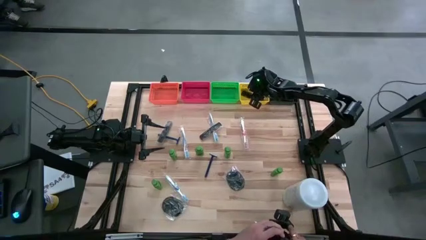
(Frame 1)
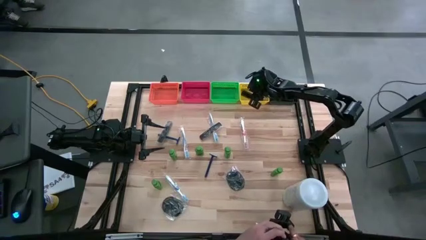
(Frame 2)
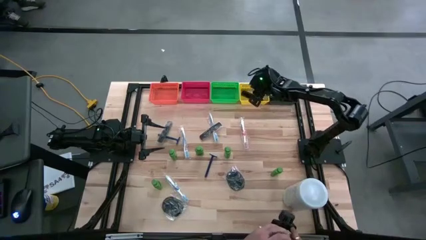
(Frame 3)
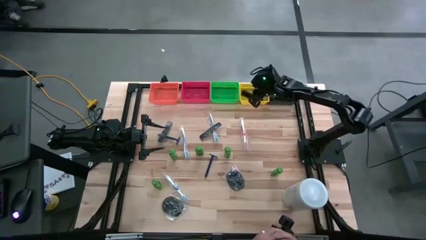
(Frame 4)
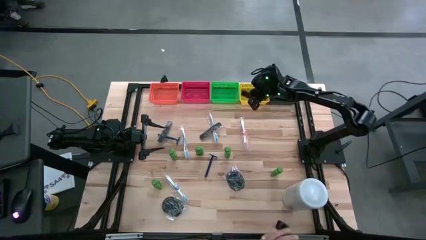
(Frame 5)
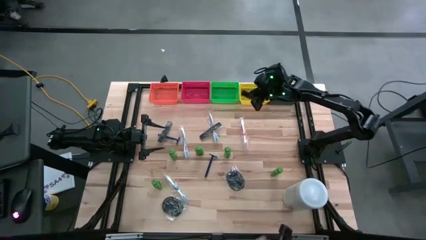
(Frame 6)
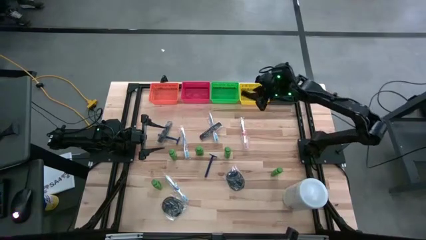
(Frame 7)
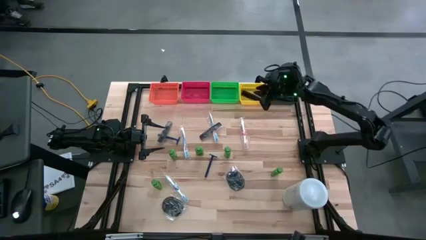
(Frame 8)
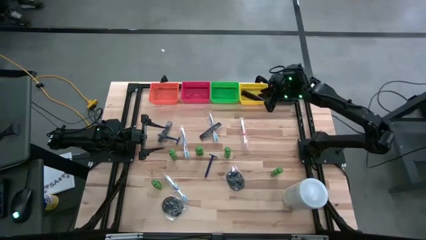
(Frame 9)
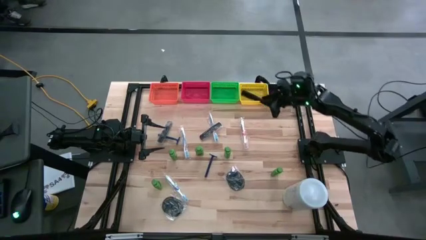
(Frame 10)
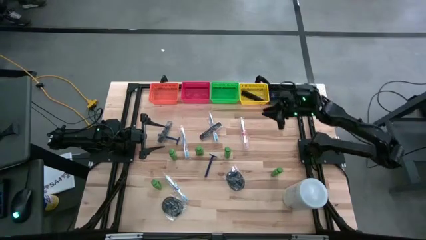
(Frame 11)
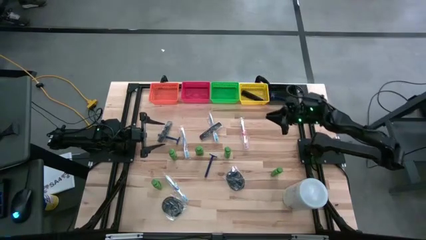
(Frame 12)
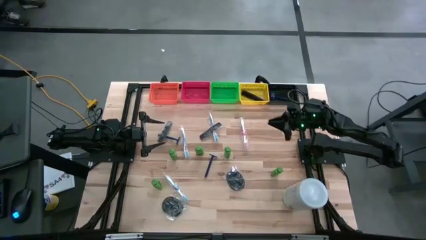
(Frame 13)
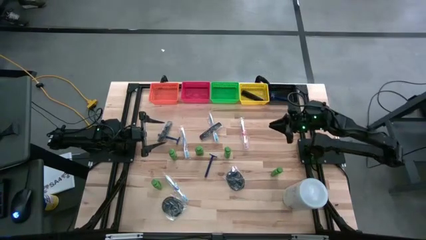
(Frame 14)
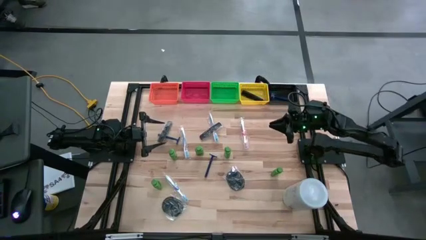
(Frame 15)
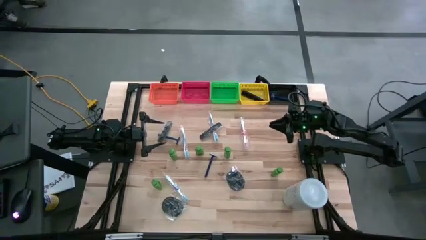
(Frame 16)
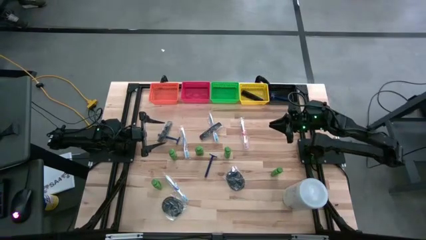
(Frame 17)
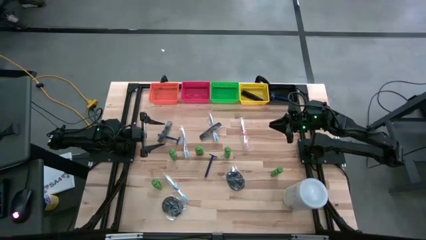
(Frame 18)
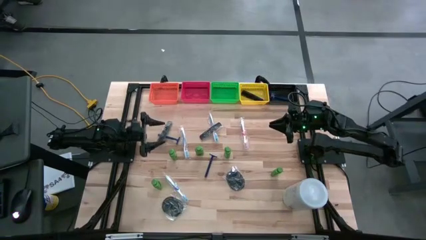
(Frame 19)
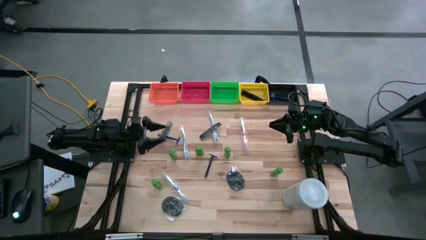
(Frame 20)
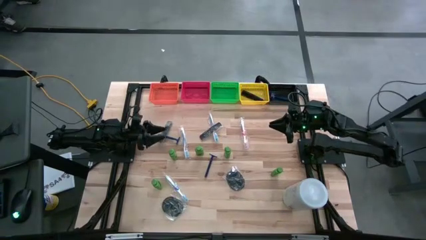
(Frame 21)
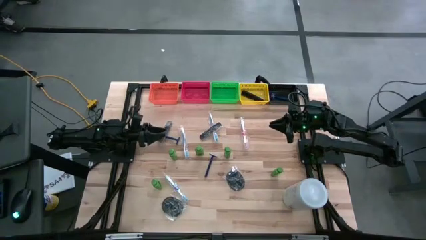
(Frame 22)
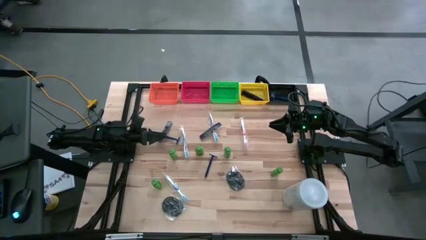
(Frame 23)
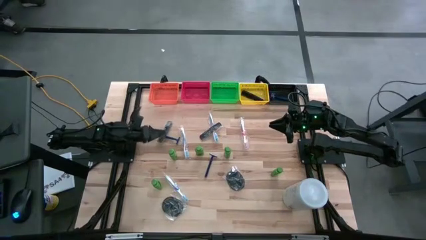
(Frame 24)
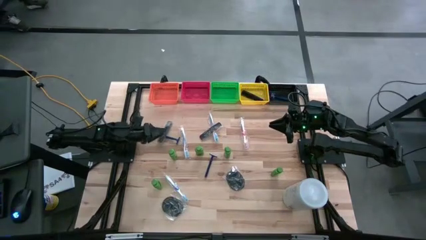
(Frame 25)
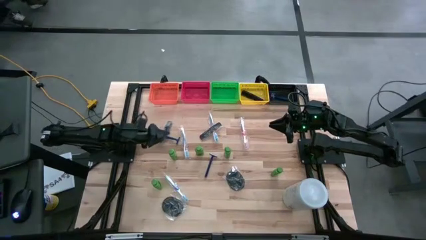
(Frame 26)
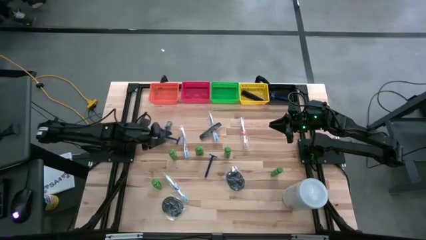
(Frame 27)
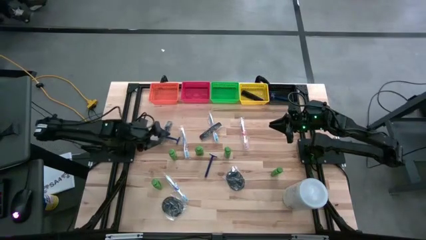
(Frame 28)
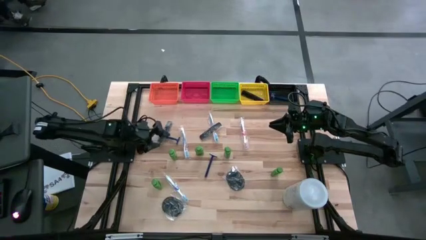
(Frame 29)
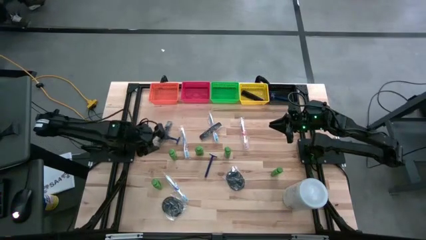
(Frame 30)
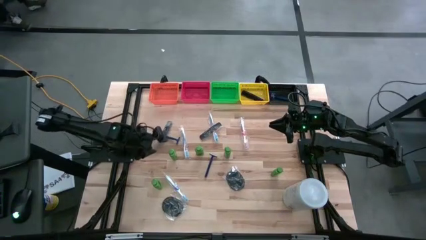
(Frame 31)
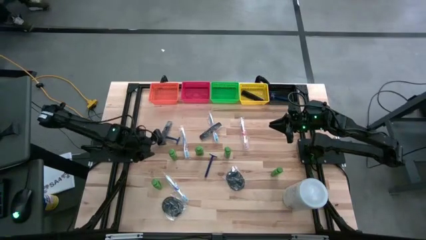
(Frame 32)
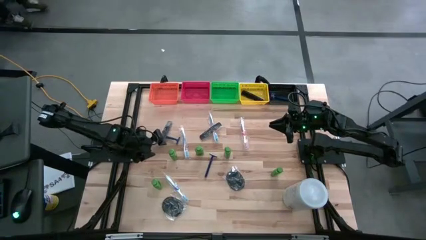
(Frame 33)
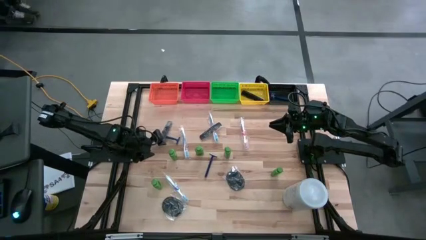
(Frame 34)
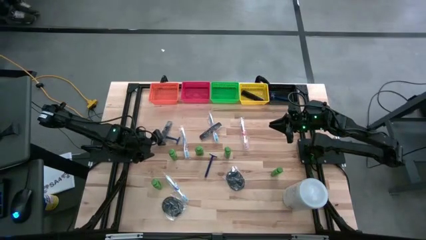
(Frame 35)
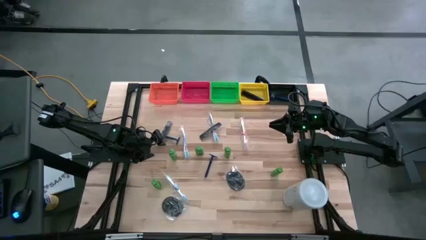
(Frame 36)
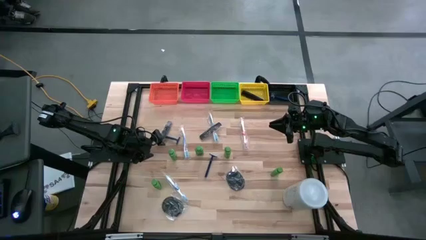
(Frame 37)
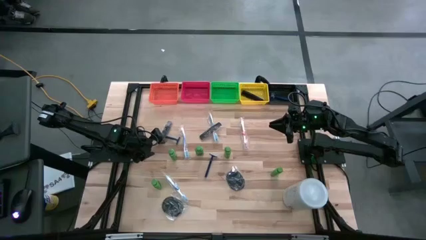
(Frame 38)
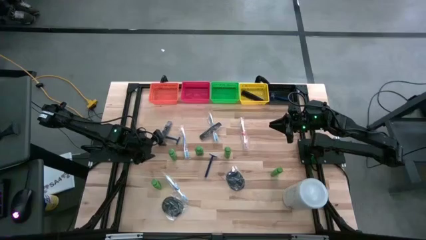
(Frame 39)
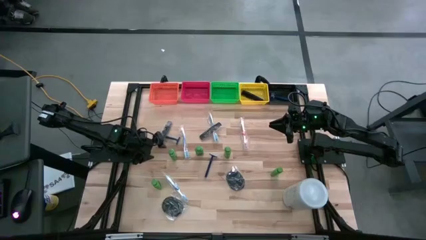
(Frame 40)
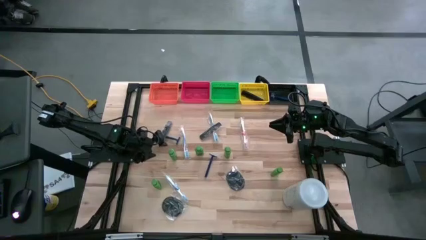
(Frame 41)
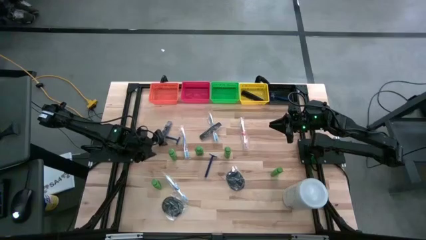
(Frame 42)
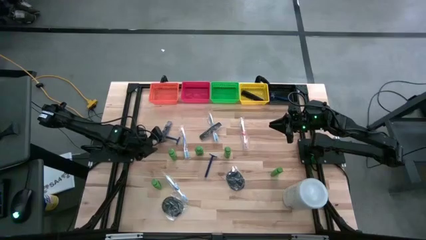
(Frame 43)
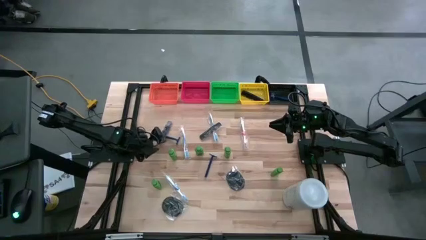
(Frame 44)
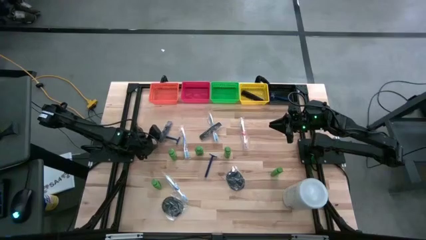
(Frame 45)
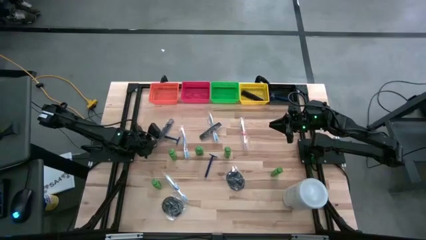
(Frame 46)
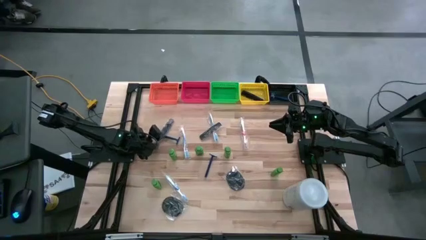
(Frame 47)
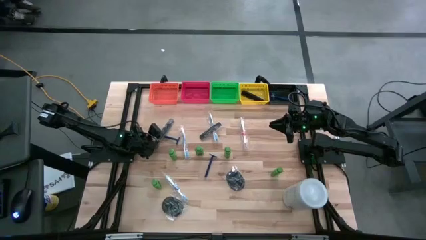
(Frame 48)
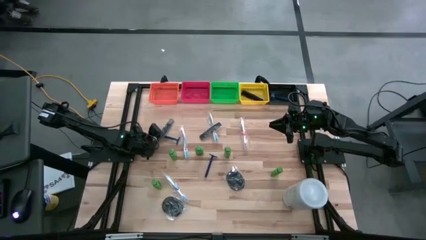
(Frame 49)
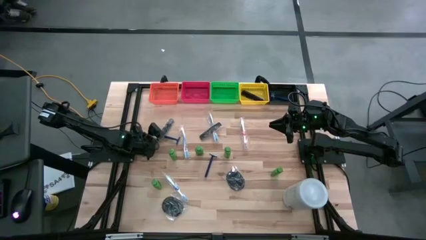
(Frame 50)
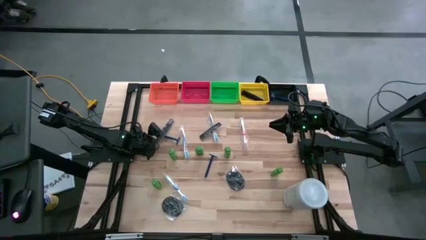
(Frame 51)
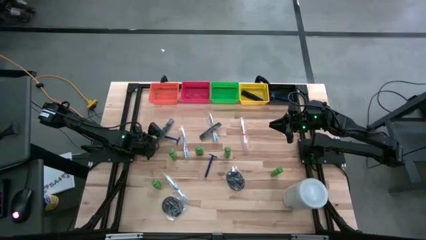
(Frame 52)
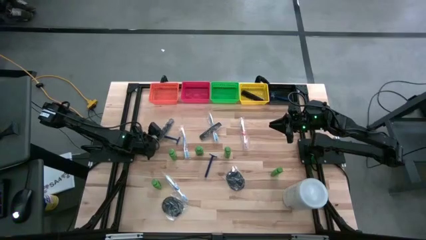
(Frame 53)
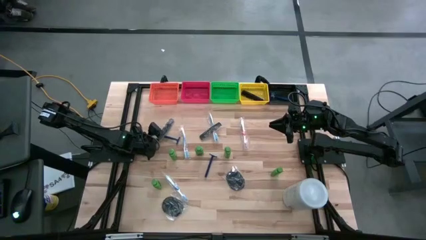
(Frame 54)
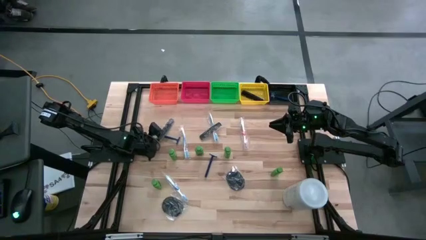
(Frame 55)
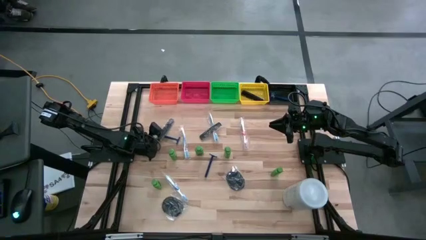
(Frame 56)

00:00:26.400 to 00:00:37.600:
Task: Pick & Place Travel size toiletries
Put the black hair comb into the yellow bin

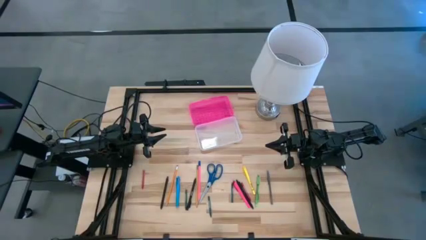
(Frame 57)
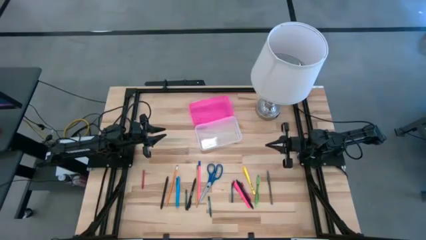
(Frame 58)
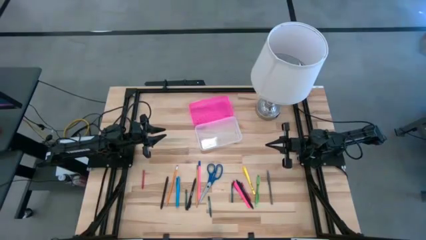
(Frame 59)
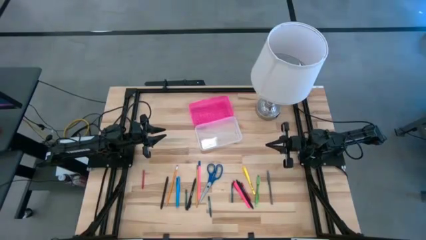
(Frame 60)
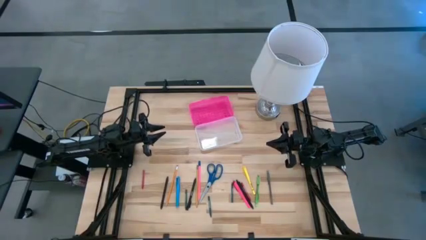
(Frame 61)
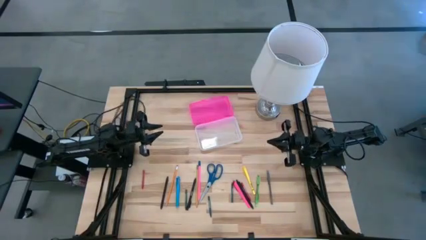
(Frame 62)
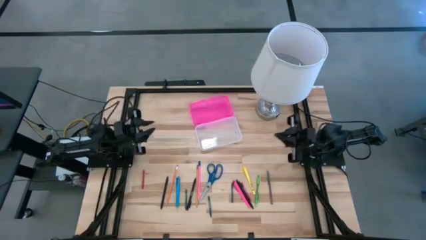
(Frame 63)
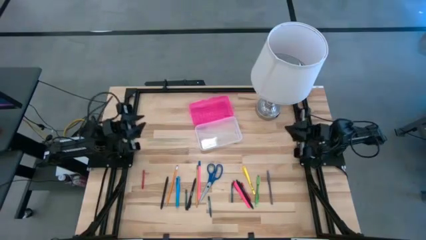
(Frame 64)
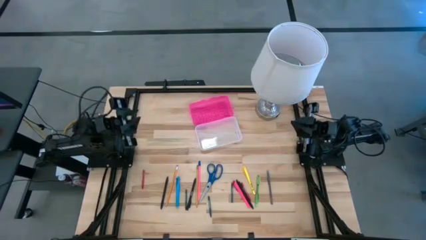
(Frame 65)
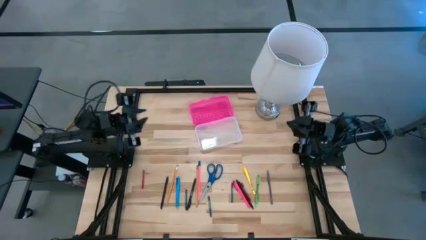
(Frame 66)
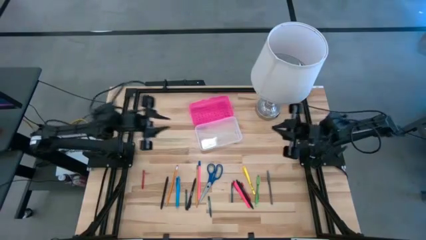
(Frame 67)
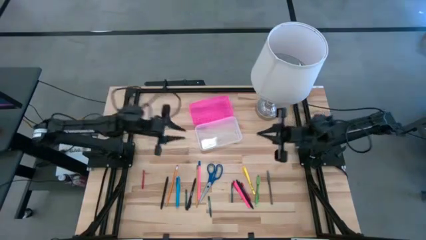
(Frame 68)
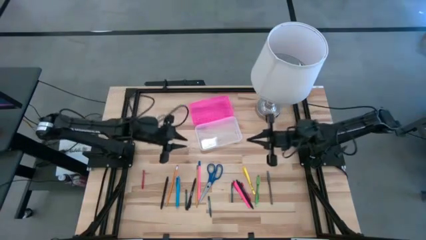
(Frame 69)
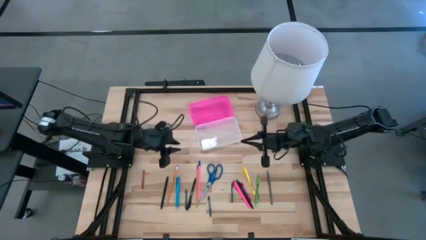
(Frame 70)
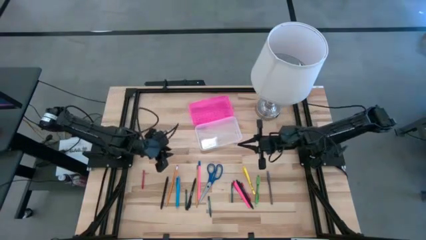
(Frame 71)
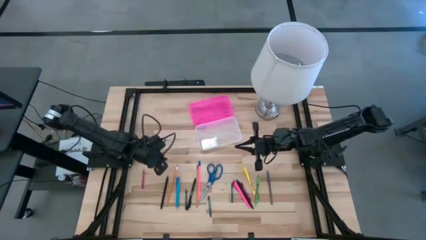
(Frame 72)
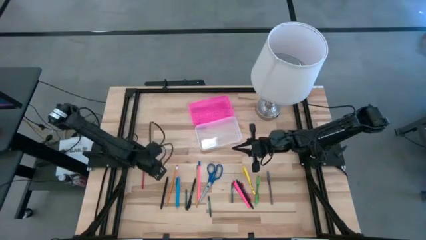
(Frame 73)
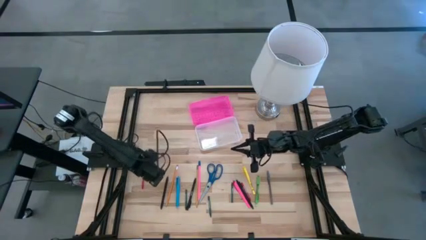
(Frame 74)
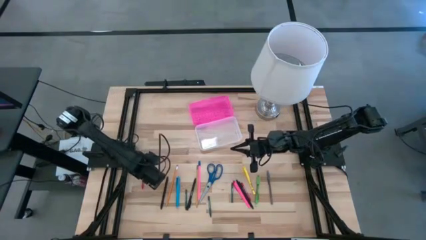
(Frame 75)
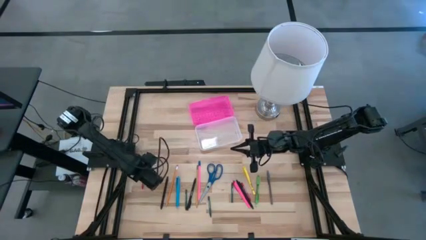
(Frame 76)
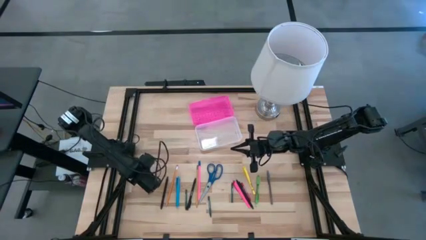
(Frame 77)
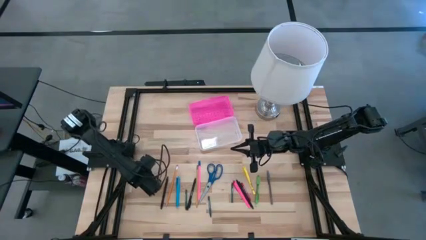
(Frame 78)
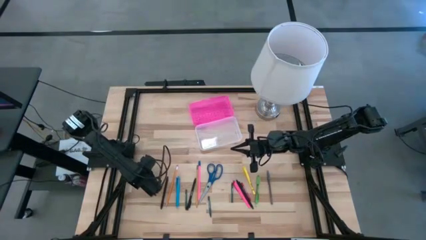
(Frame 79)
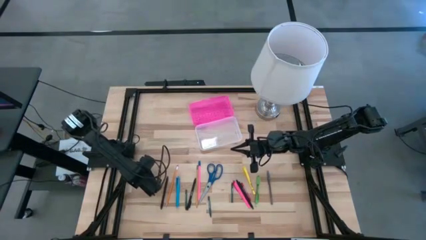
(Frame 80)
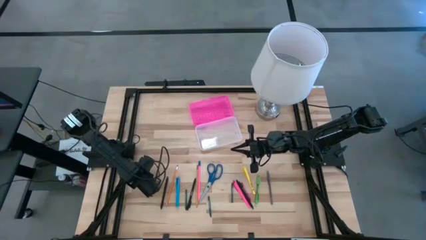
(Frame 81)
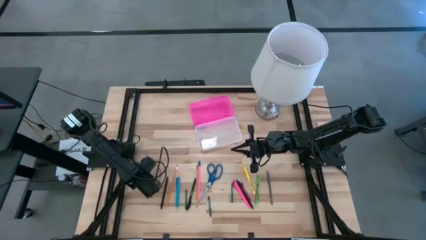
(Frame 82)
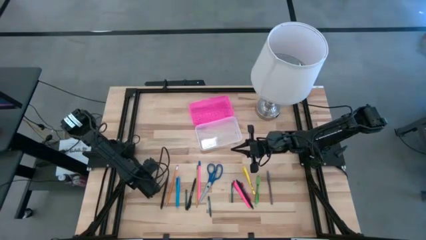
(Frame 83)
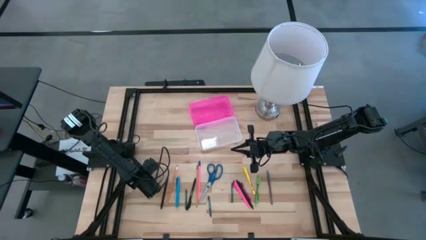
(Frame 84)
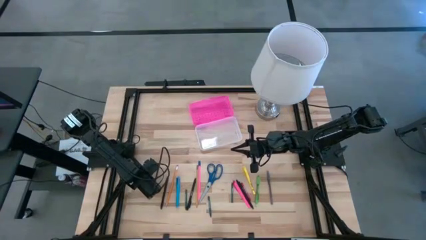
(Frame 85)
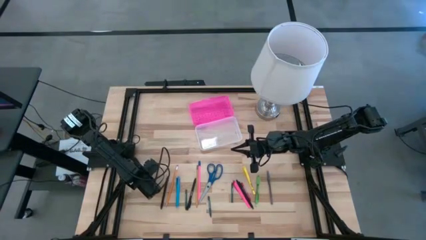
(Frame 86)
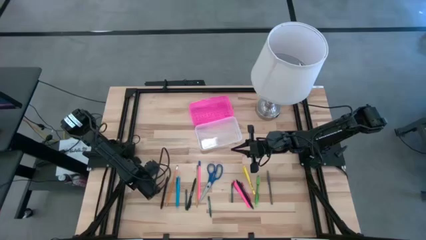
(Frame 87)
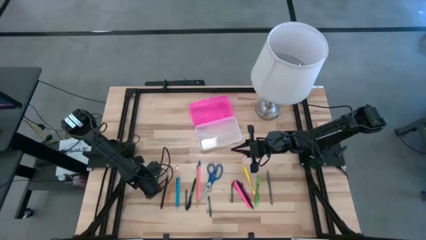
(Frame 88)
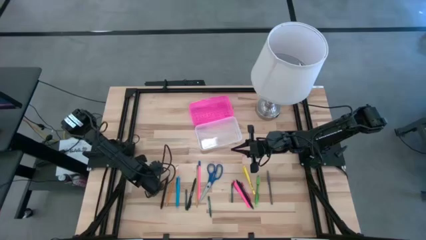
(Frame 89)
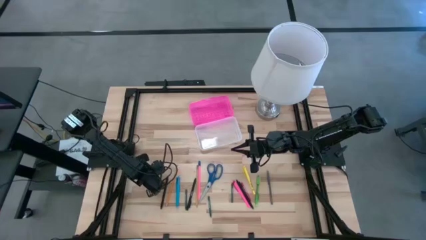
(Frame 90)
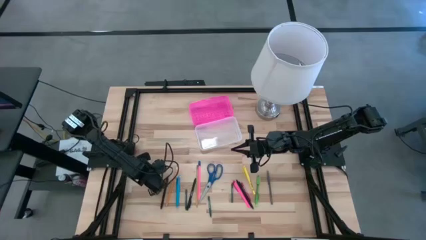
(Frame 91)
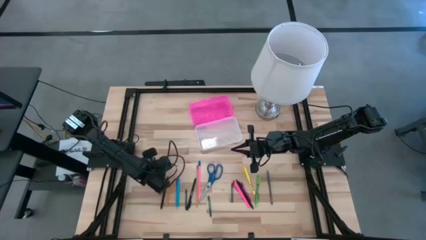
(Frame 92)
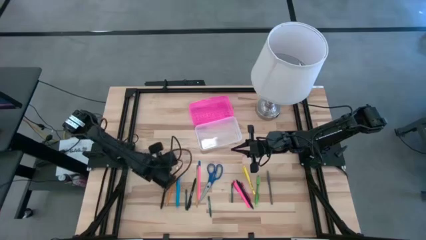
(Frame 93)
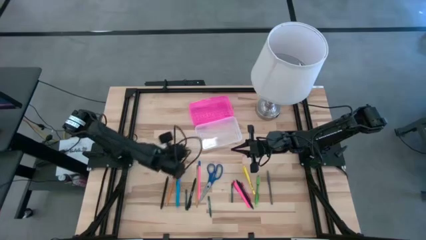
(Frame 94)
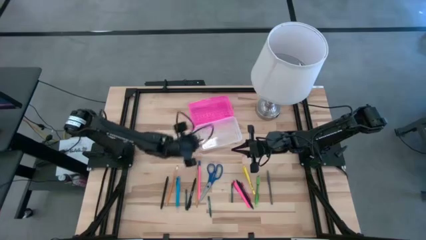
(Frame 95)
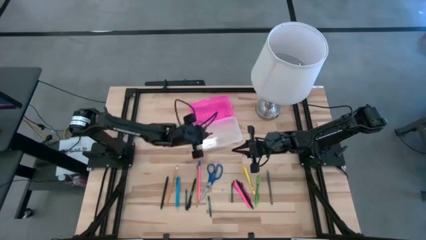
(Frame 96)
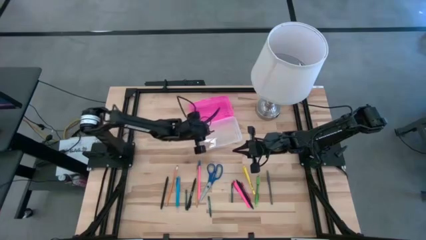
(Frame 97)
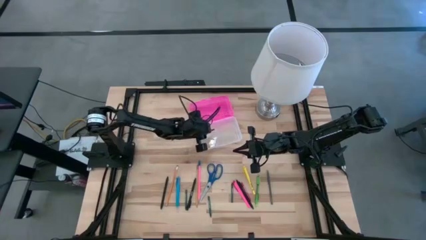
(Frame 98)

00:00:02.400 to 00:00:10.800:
Task: Pick & place school supplies into a supply box
Put the red crayon into the pink supply box
